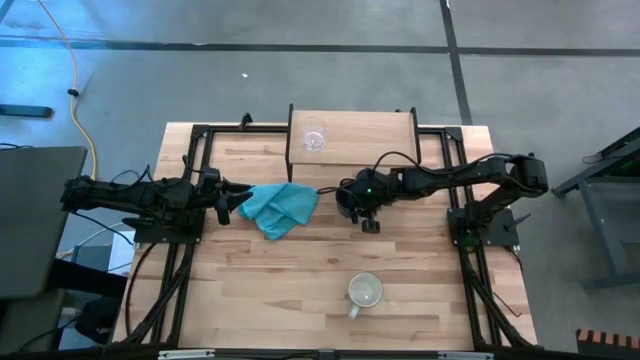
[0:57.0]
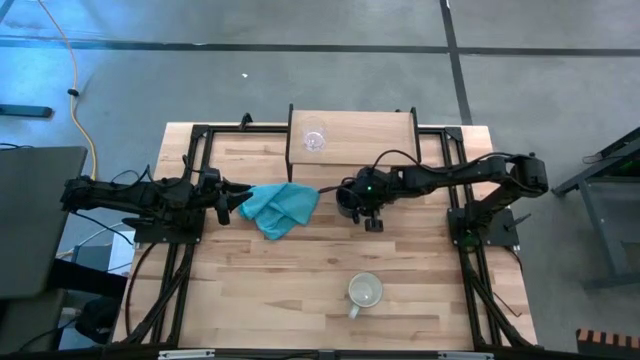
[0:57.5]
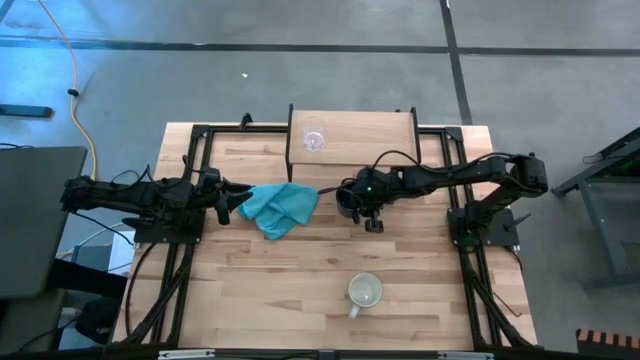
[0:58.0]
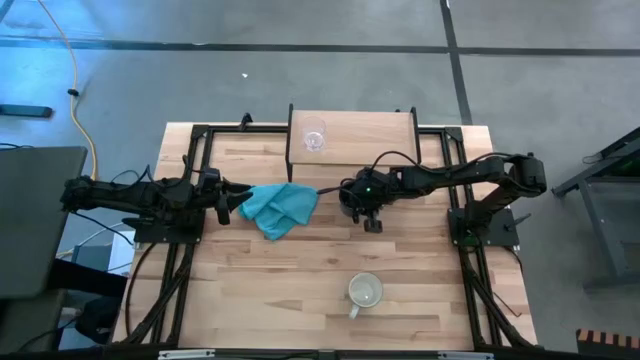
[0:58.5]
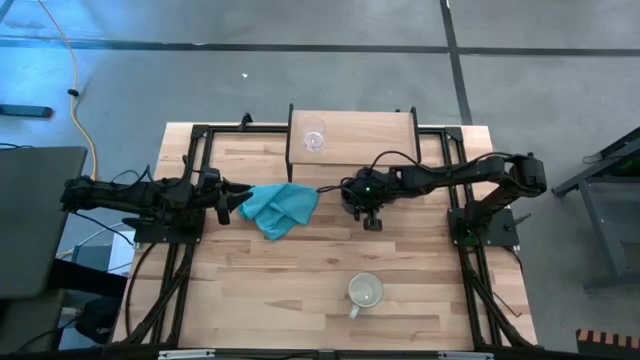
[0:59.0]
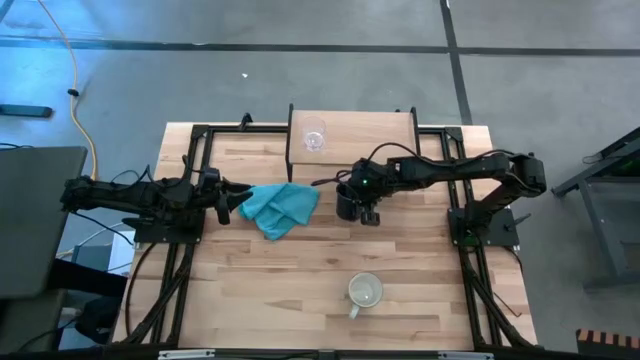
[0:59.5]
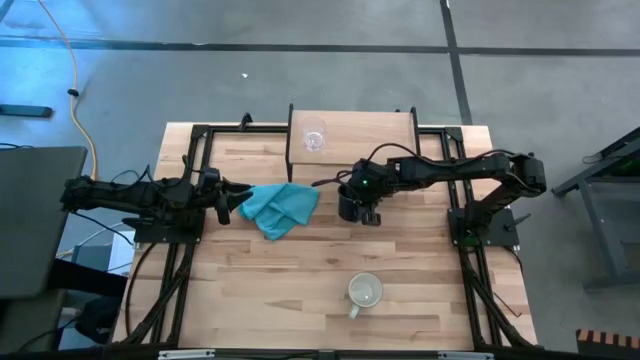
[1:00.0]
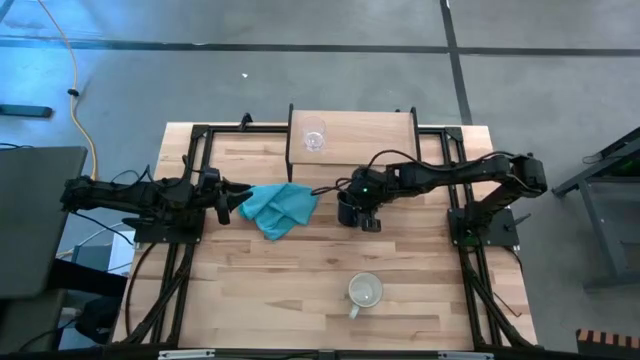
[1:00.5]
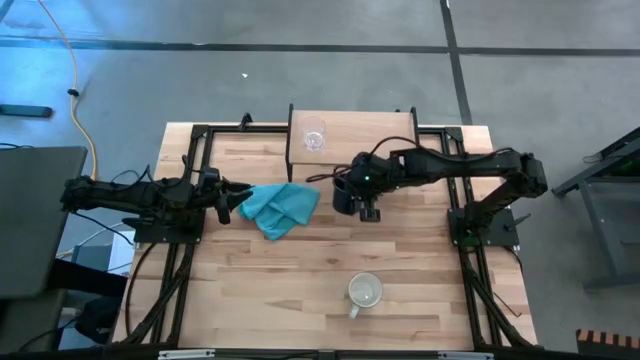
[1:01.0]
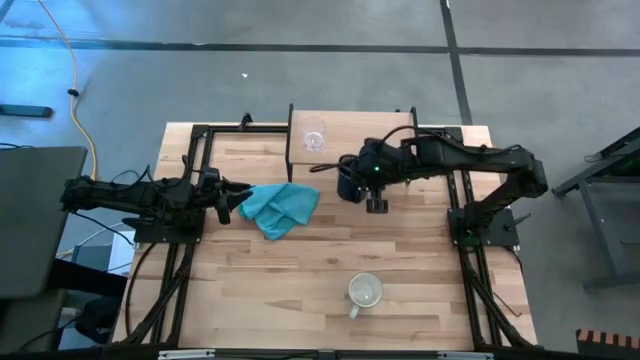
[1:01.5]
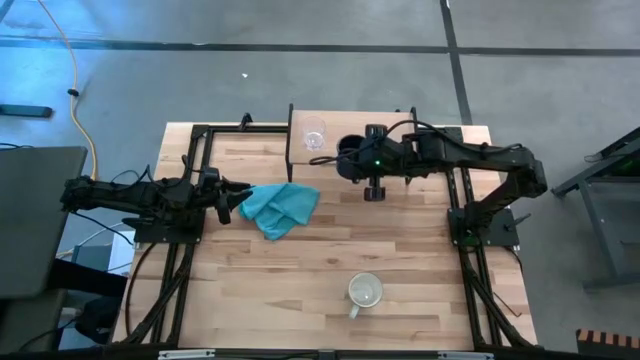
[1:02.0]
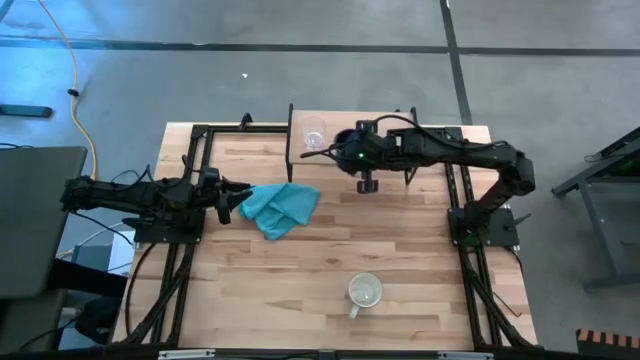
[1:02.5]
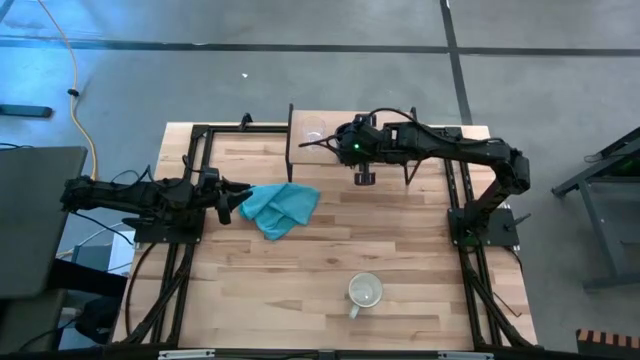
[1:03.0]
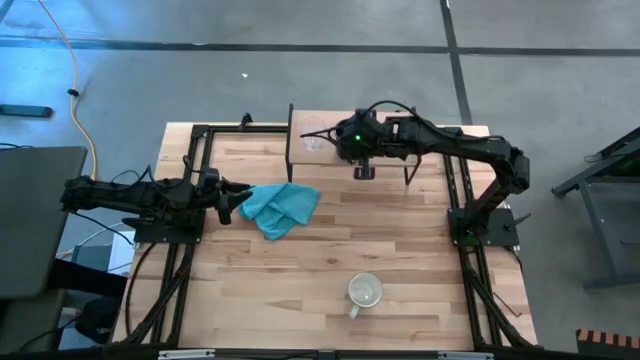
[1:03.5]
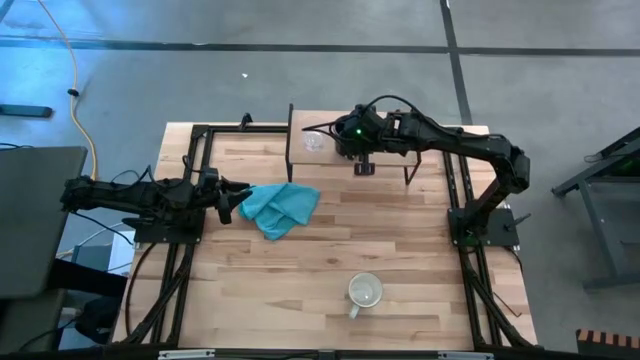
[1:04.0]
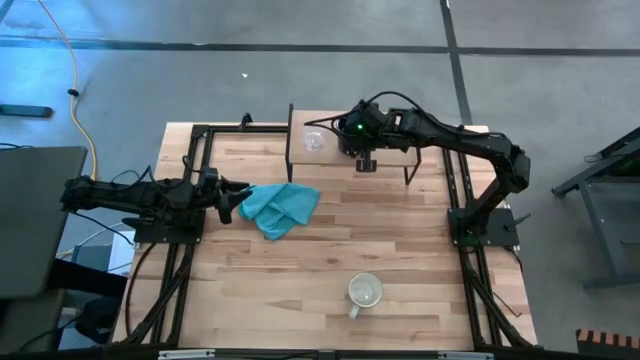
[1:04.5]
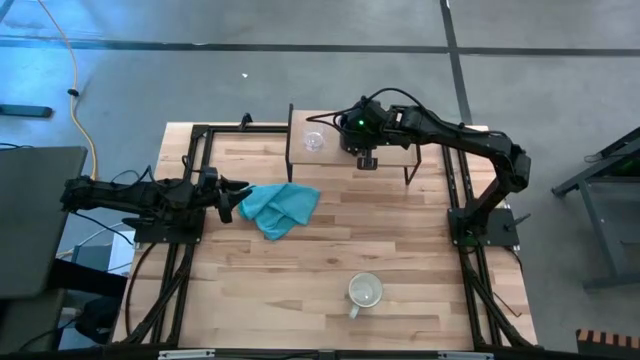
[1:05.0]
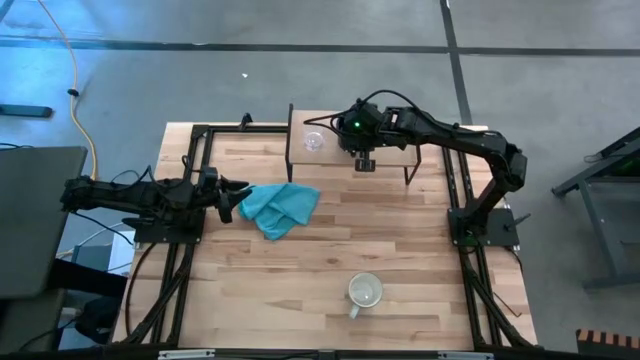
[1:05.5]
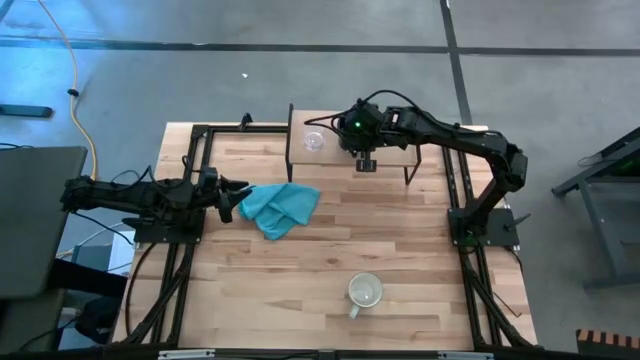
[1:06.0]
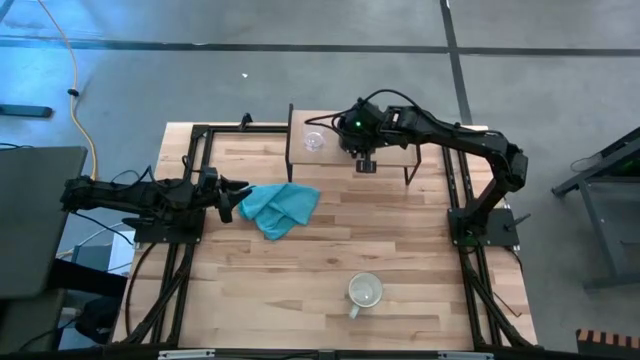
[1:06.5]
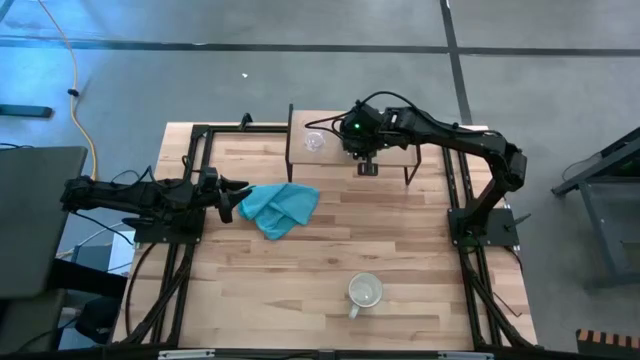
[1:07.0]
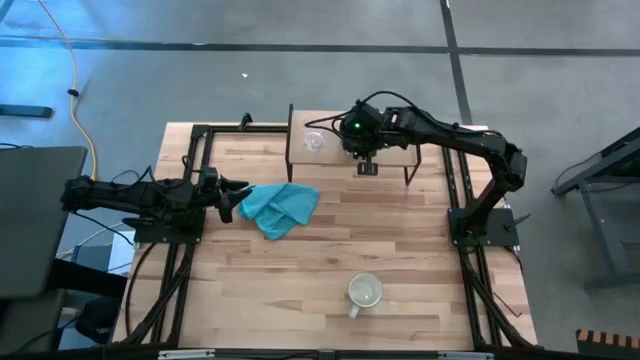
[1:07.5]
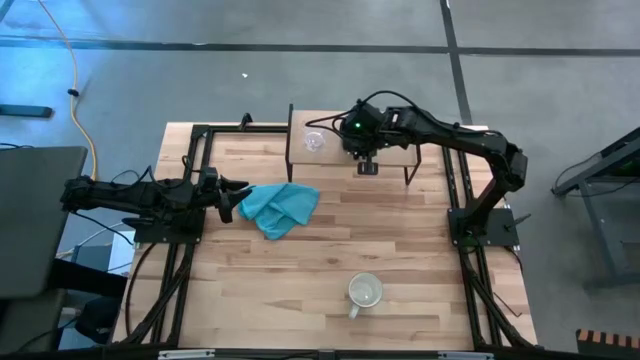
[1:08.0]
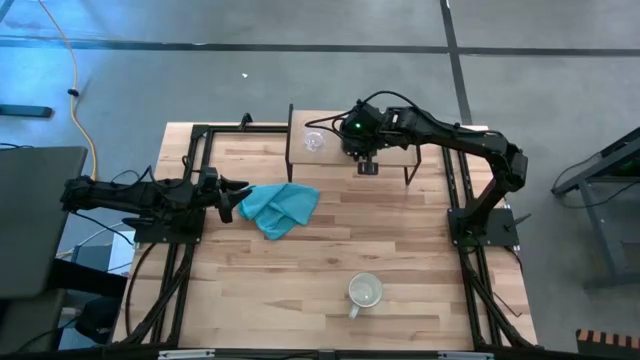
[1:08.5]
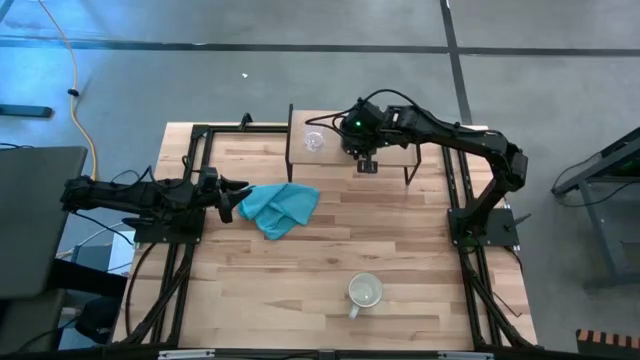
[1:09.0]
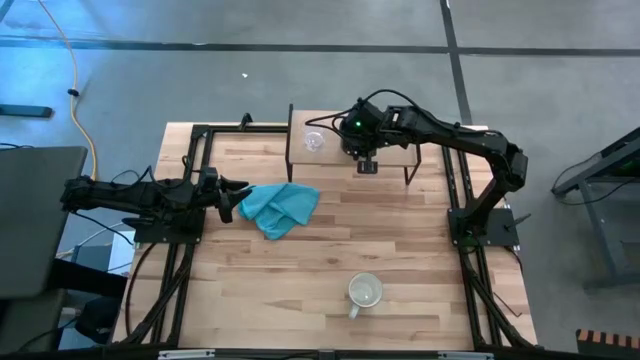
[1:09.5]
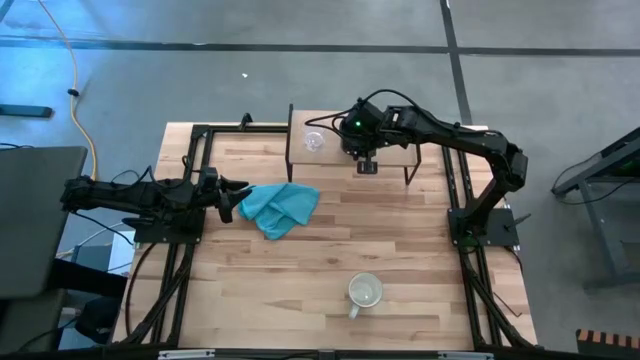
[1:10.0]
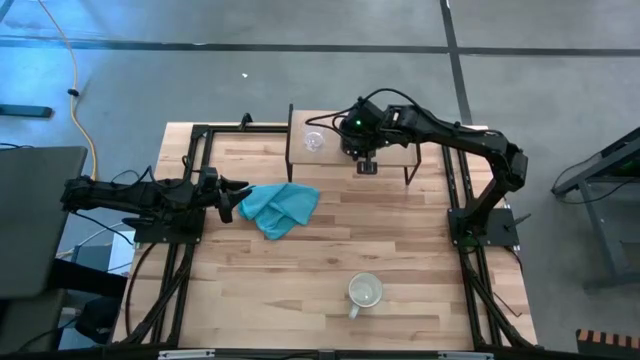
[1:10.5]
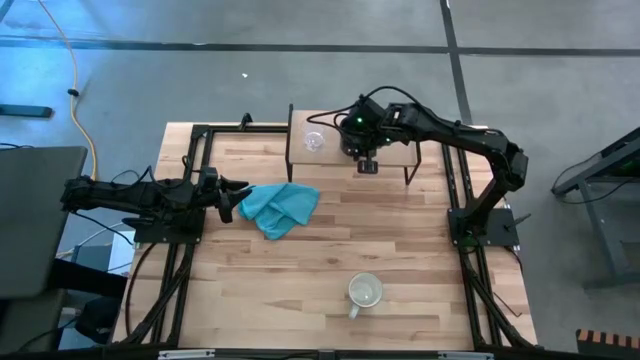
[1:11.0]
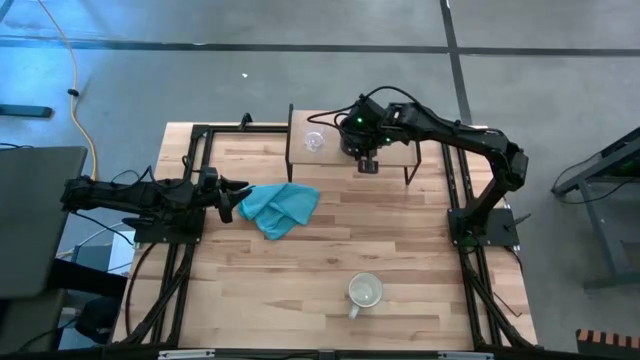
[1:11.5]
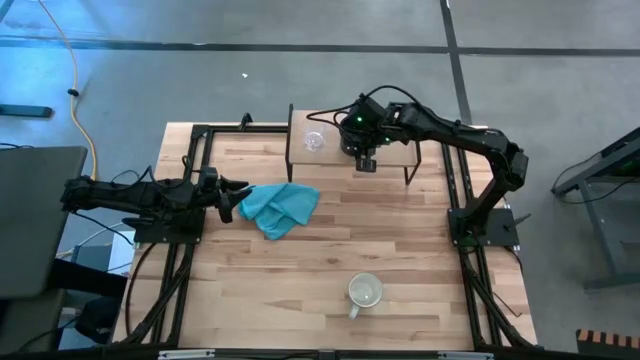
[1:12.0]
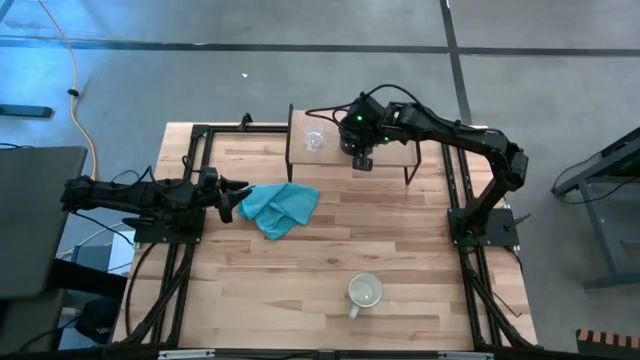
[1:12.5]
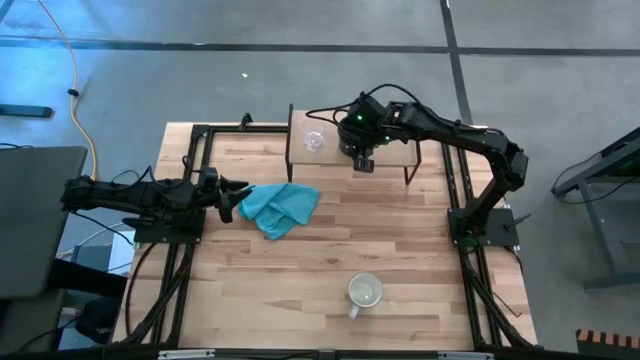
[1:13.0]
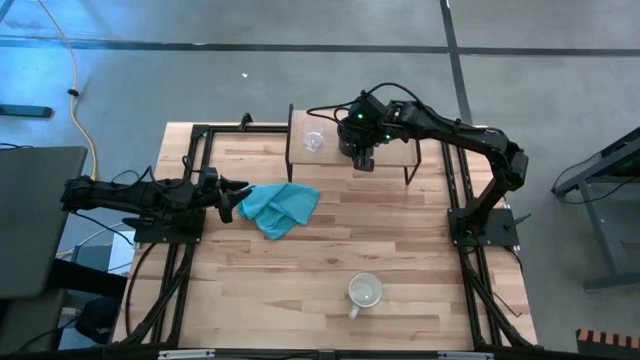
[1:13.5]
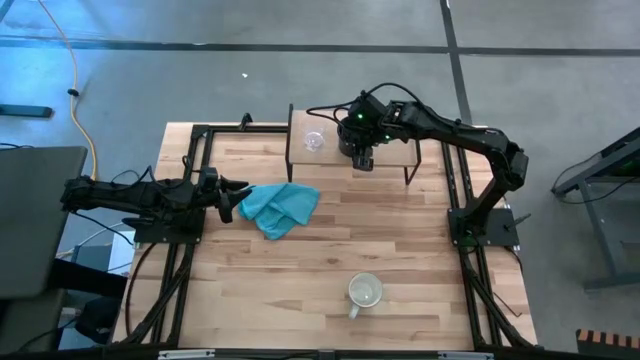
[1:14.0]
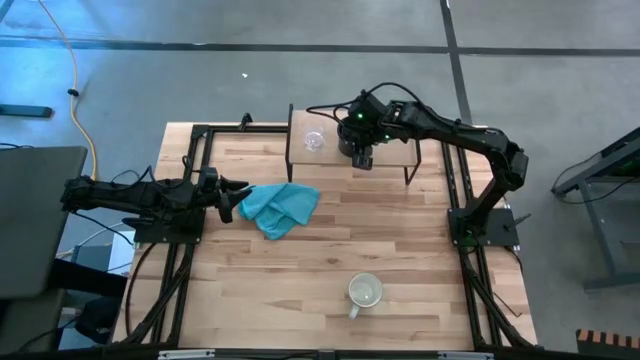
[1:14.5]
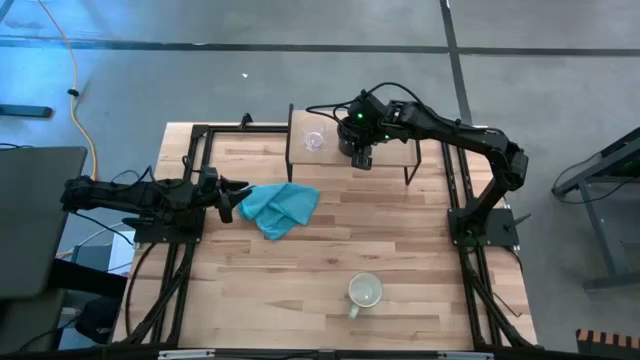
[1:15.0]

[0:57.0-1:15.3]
Task: Stack small to large cups/mugs on shelf
Put the dark blue mug on the shelf

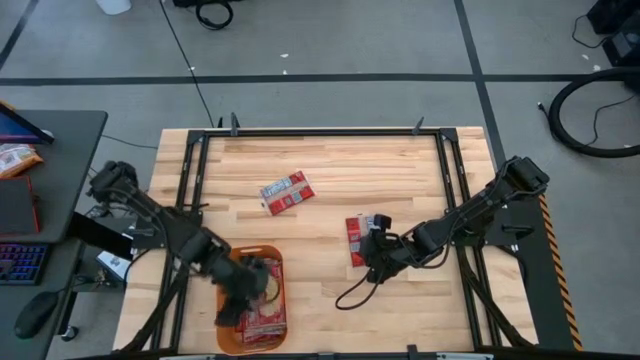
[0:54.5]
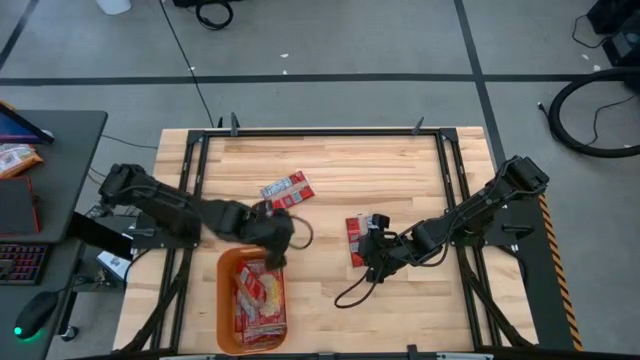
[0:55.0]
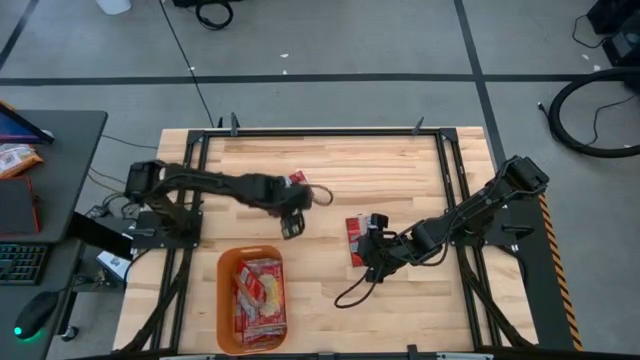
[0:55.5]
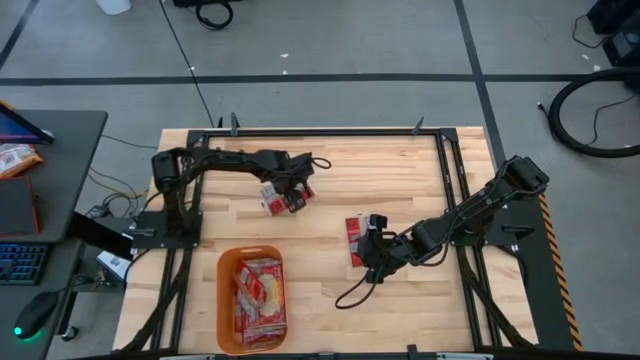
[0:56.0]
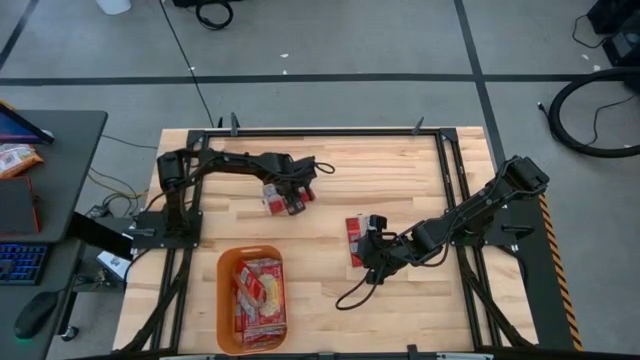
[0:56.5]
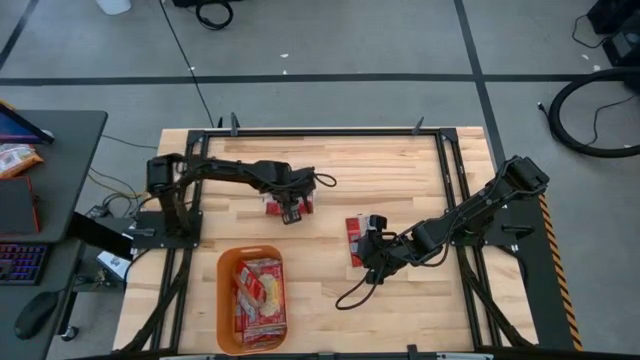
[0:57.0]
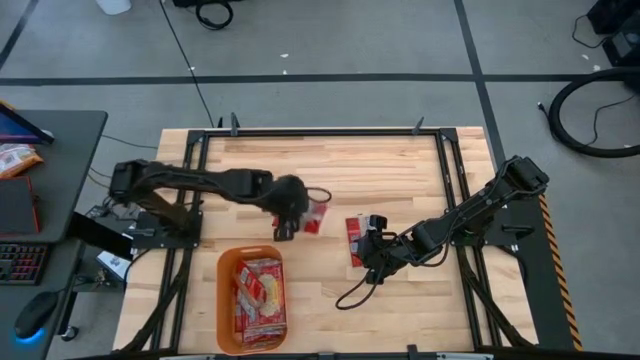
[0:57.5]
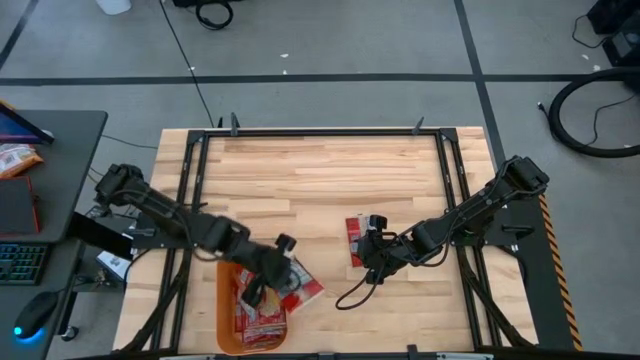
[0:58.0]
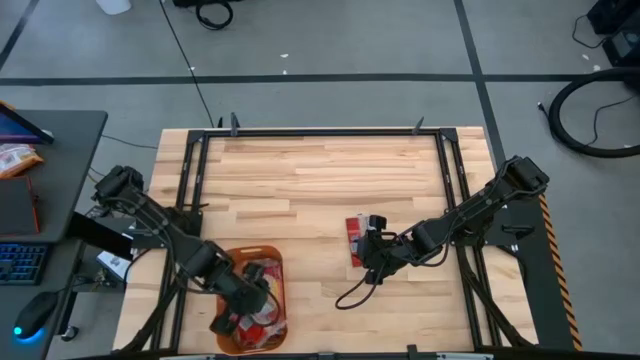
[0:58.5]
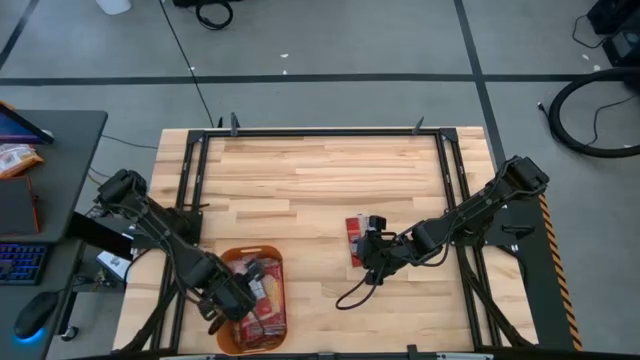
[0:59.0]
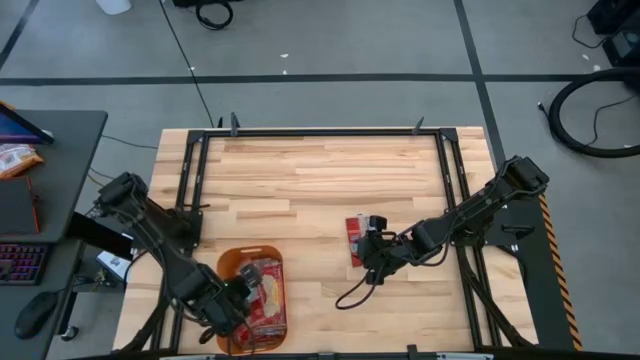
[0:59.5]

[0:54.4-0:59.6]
Task: Sort popcorn bags into baskets
Put the red popcorn pack into the orange bin
